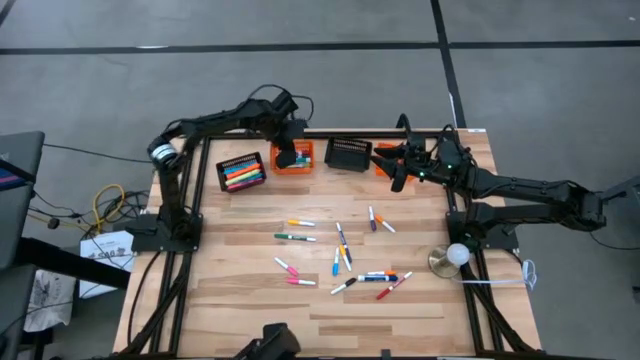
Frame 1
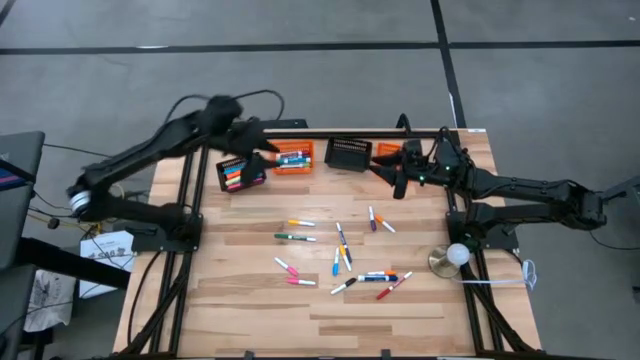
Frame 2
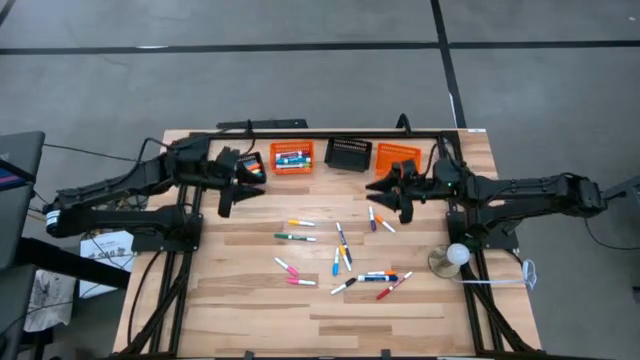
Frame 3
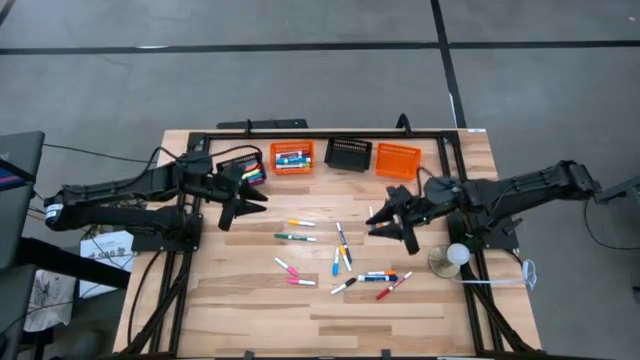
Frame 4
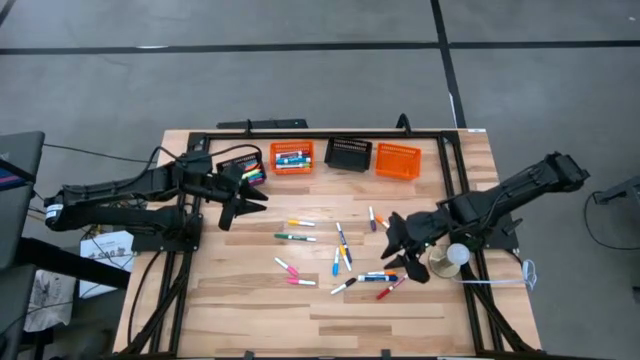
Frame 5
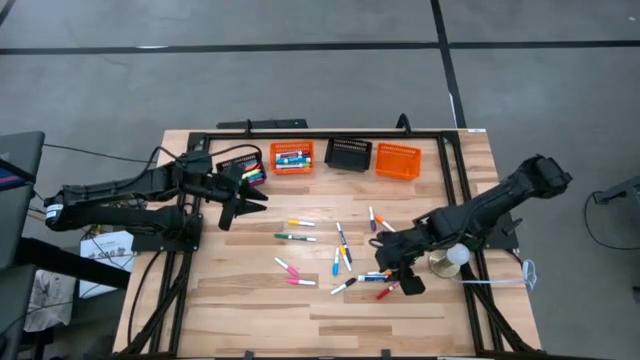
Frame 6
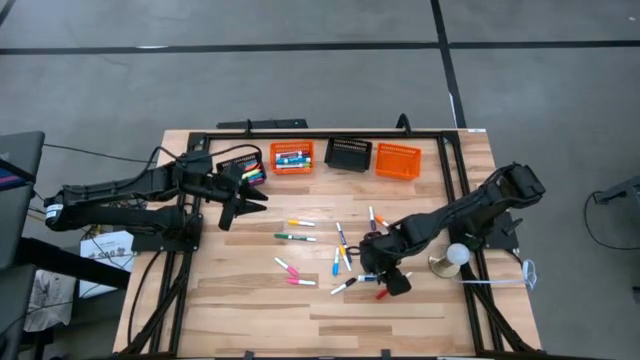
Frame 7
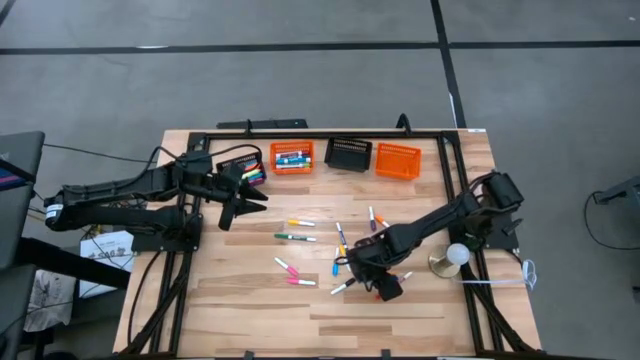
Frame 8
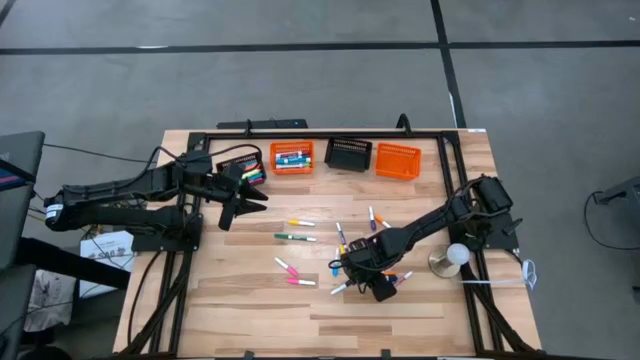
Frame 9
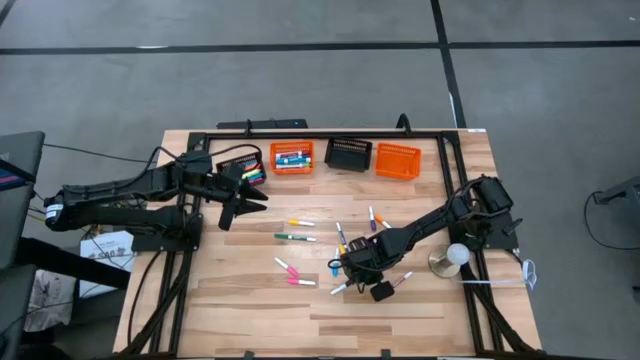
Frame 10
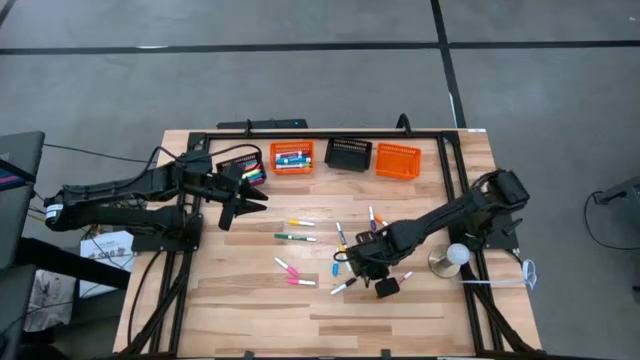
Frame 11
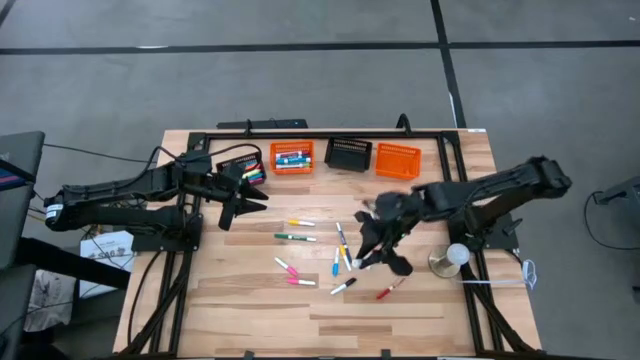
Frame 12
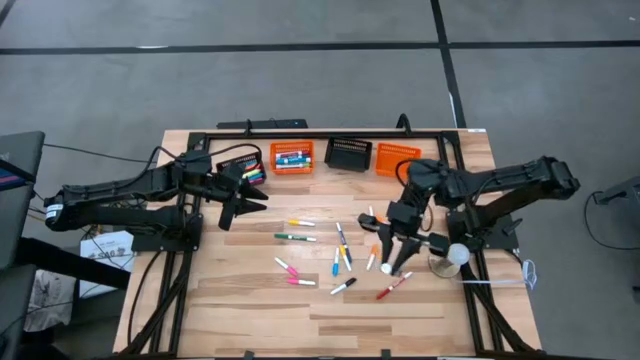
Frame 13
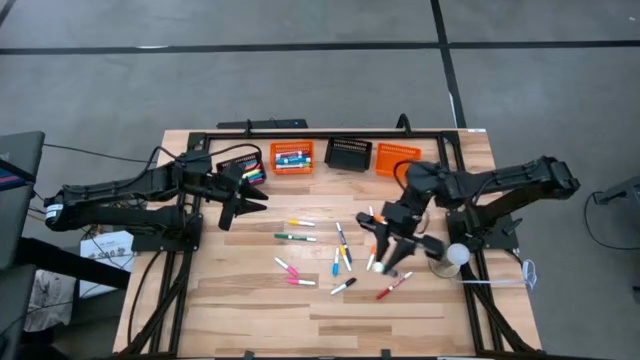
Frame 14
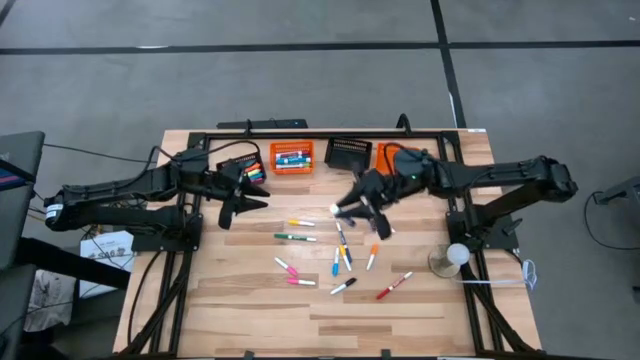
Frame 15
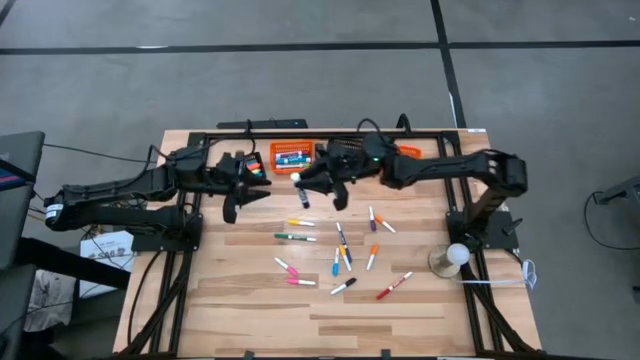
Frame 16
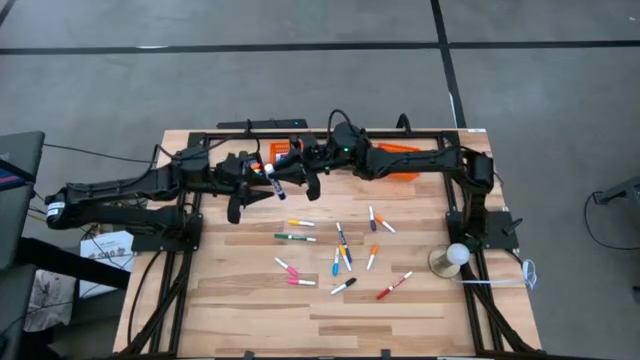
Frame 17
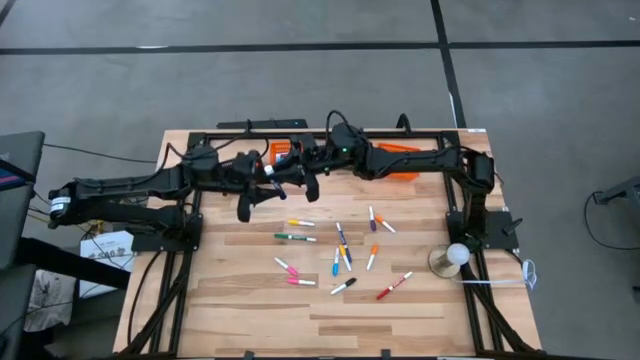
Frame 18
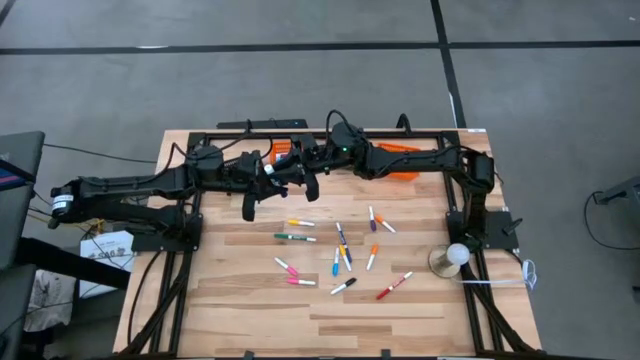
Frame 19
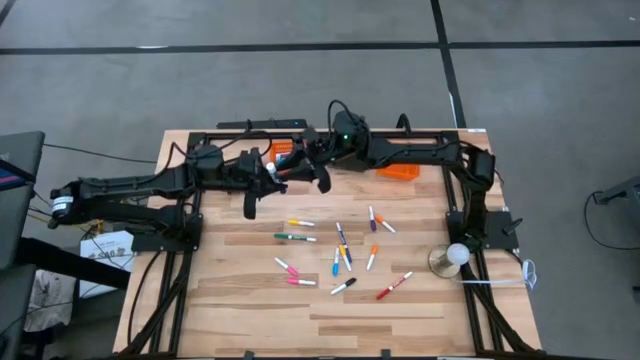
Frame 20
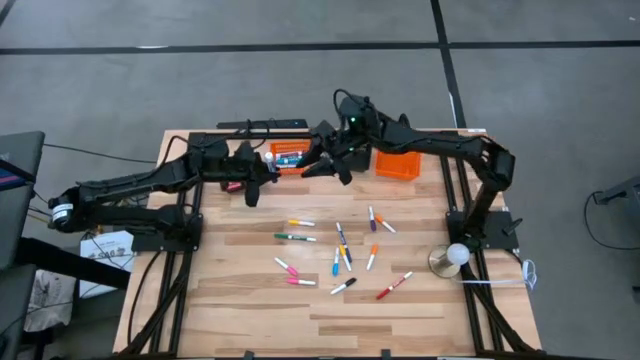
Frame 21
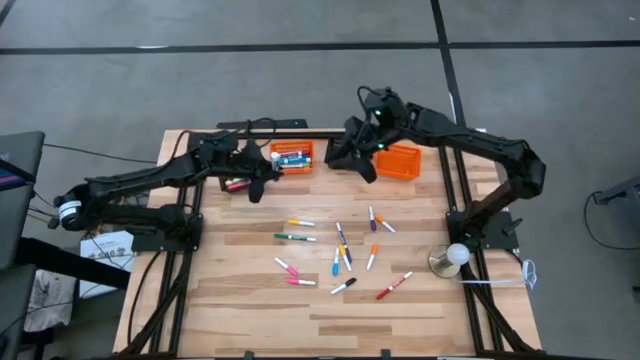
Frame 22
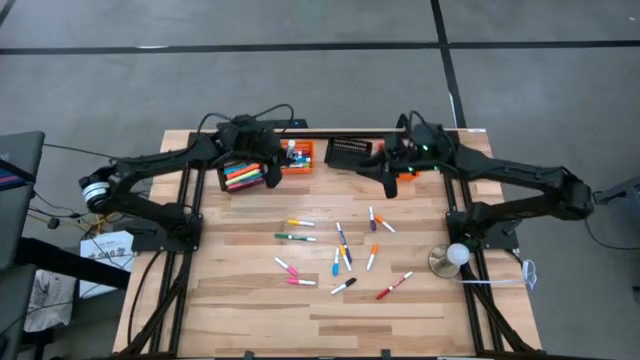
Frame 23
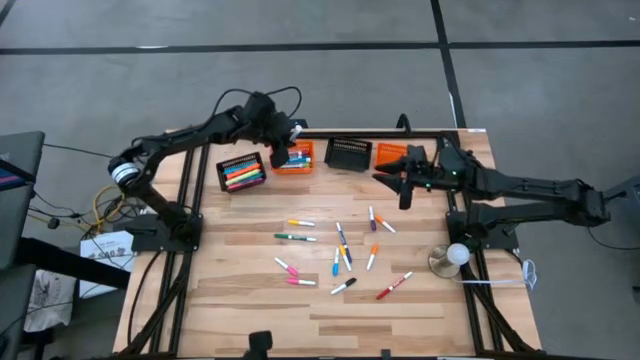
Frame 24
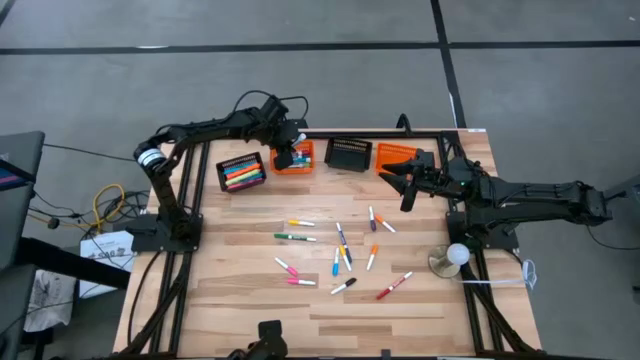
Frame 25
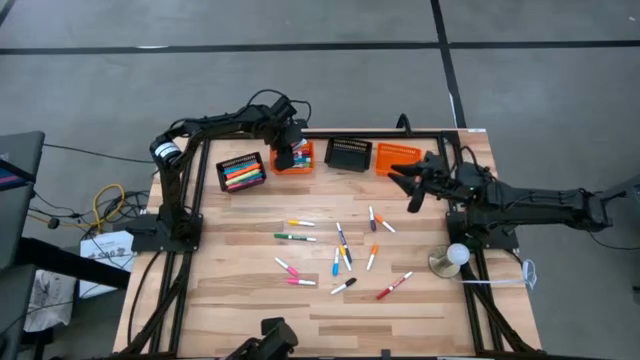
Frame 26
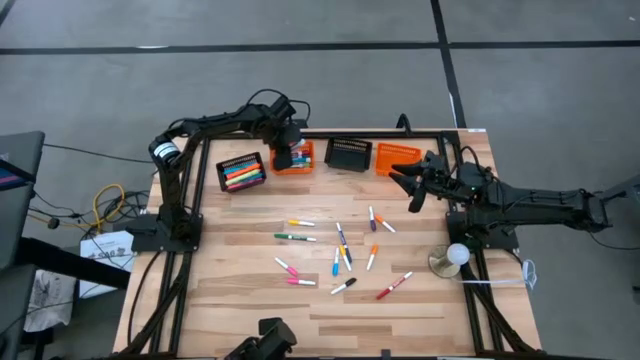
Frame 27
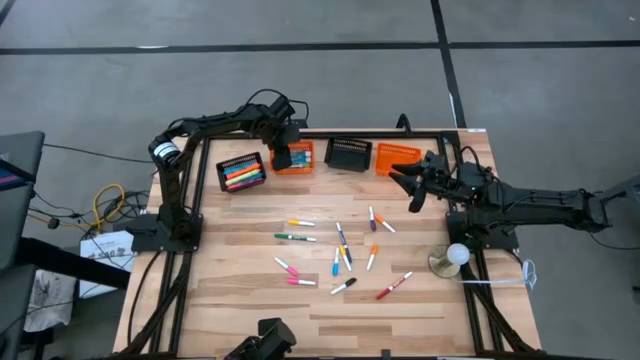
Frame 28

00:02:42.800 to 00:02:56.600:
Task: Pick & Place Markers
Put the large blue marker pen into the left orange bin

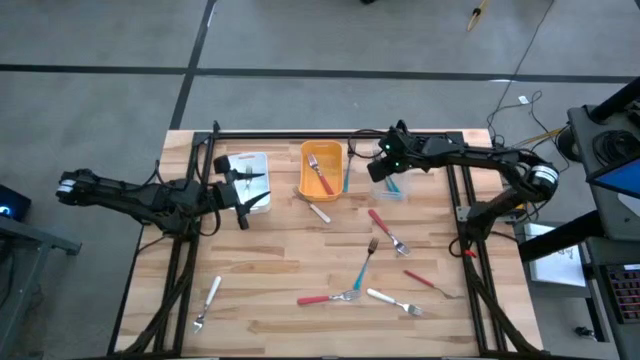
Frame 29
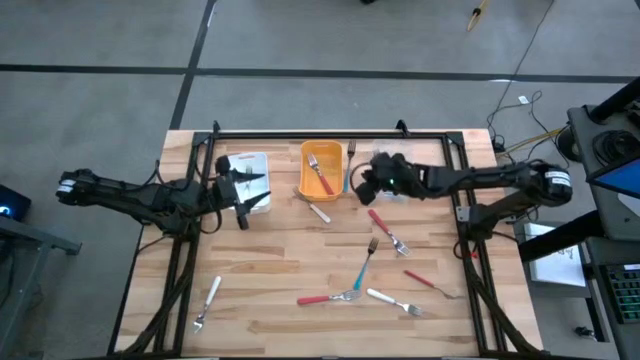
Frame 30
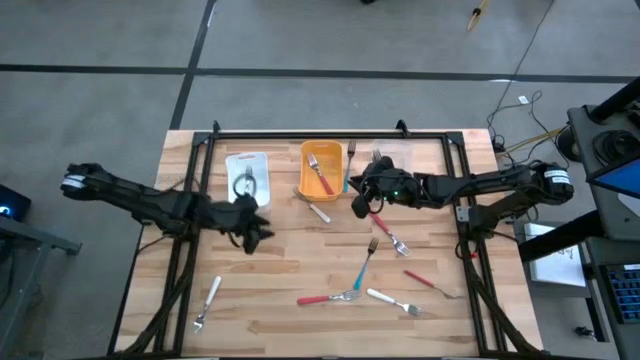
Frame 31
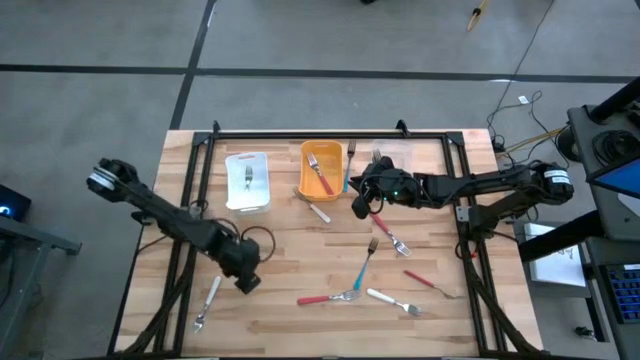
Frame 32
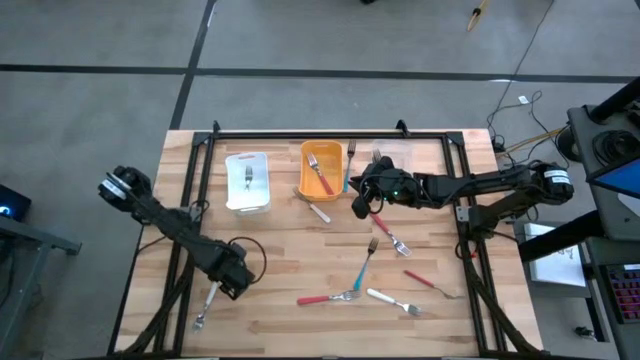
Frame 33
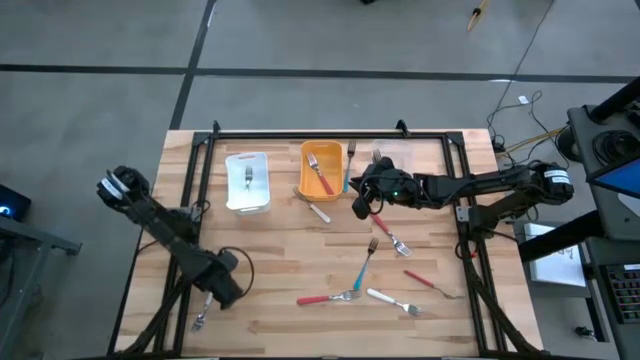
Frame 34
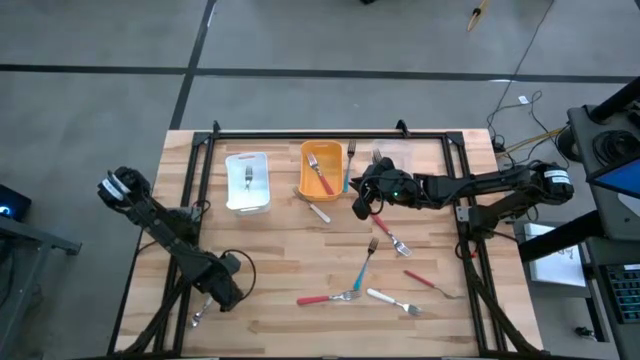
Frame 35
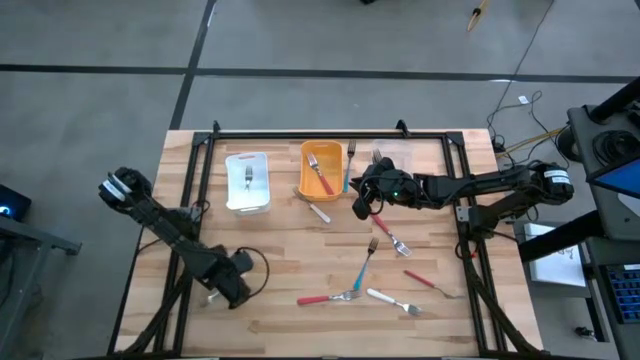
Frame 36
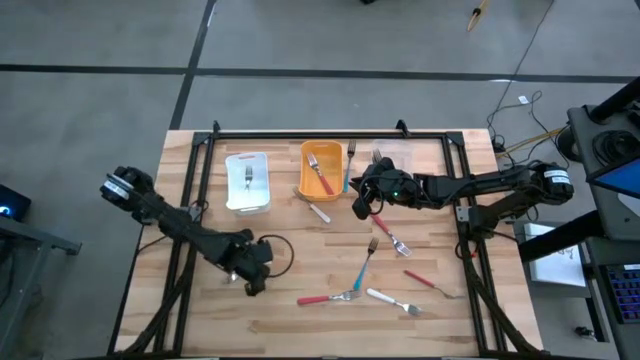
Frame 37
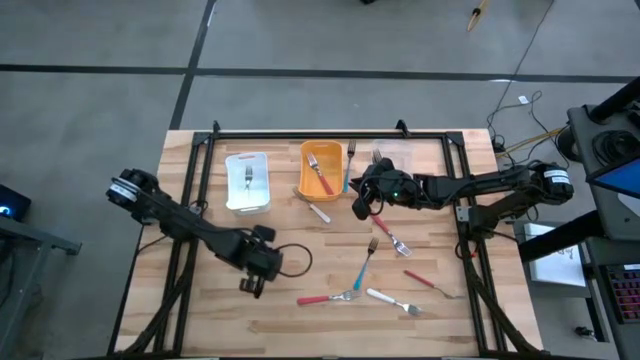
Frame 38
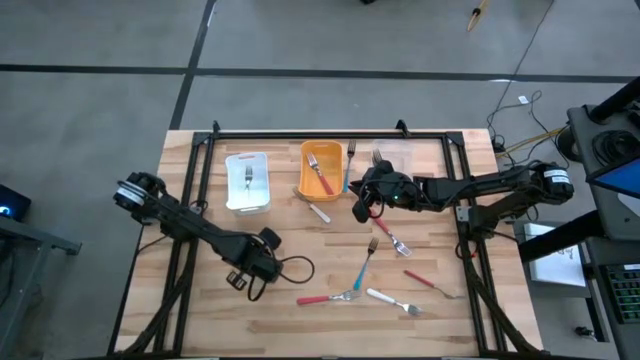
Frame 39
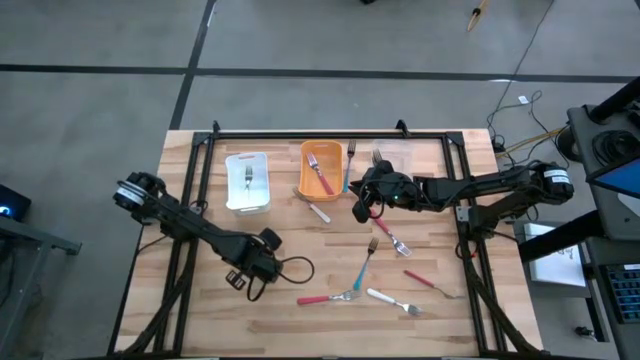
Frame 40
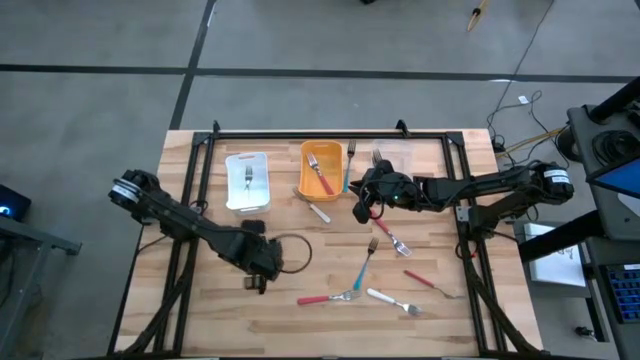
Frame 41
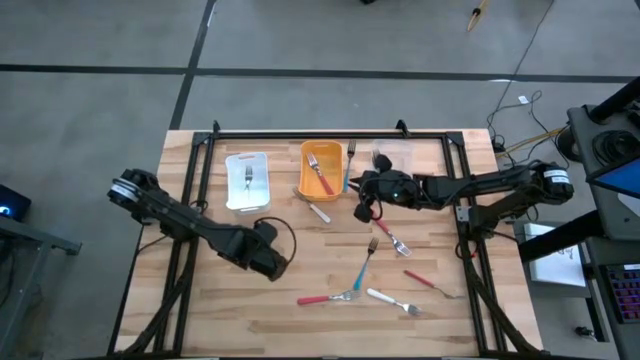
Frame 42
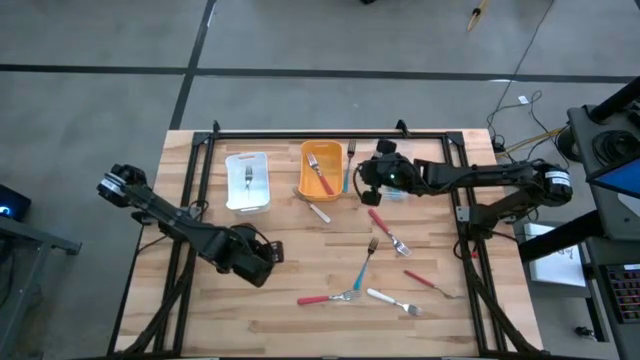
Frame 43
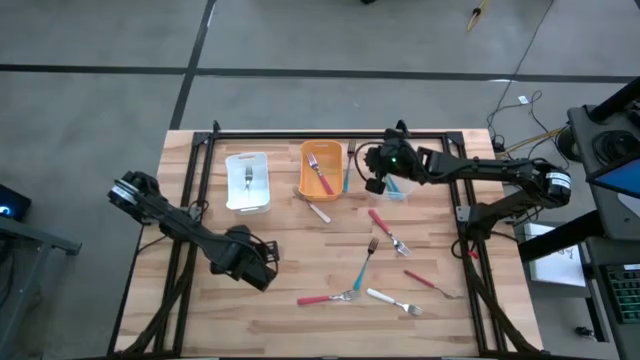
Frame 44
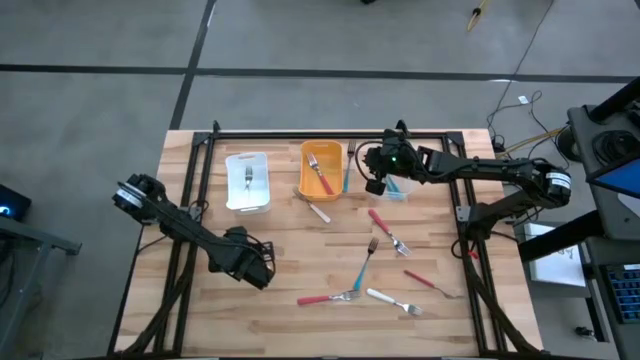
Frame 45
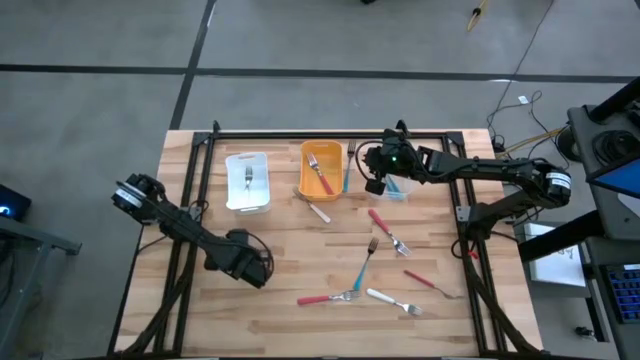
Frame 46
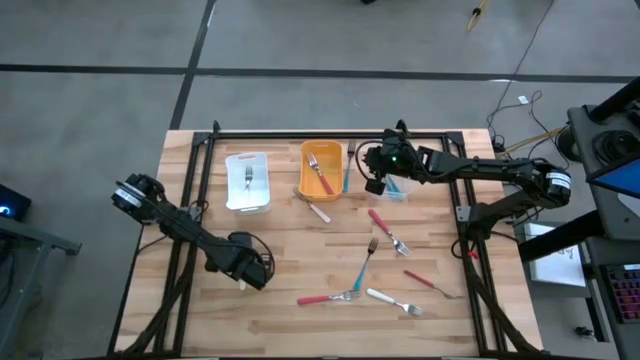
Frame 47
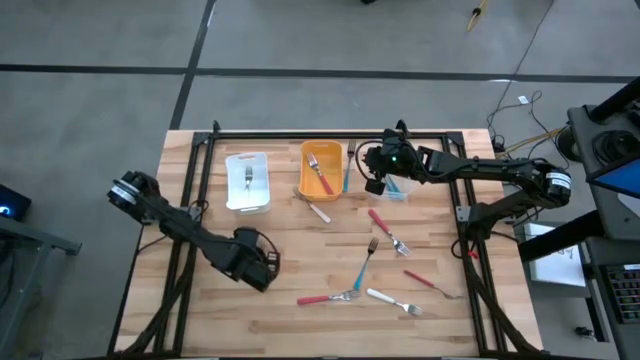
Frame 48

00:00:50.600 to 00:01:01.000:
Task: Sort silverware by color (type)
Put the white fork into the white bin
